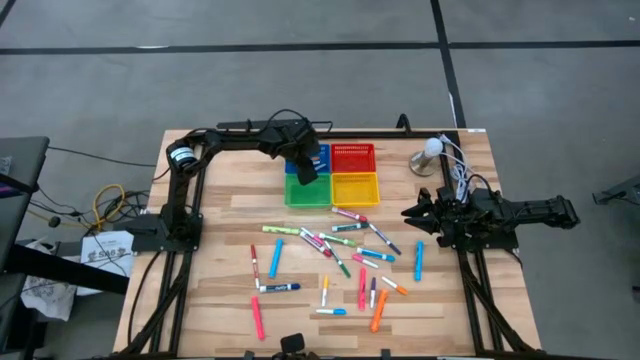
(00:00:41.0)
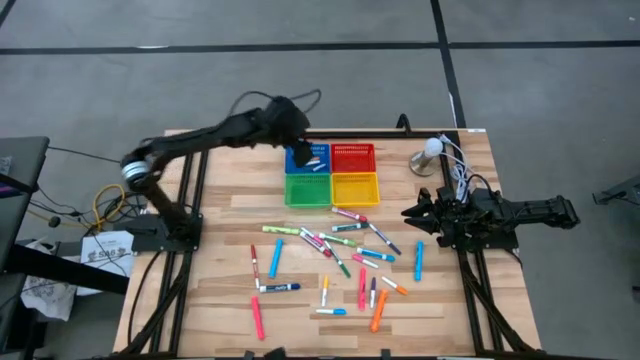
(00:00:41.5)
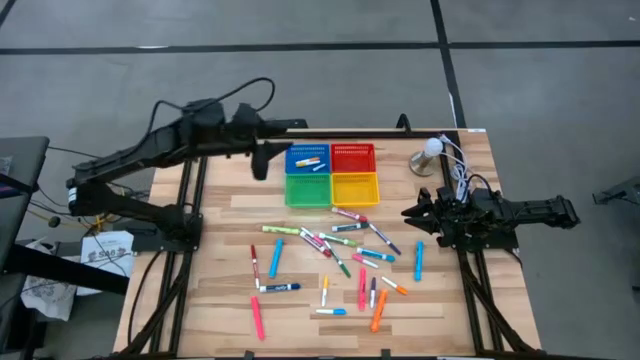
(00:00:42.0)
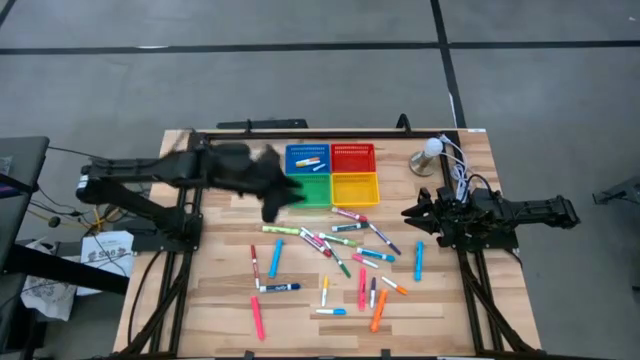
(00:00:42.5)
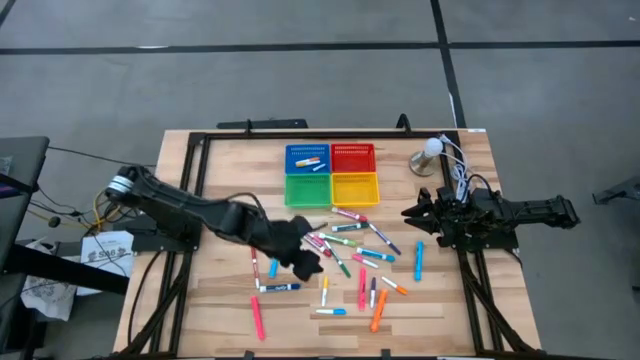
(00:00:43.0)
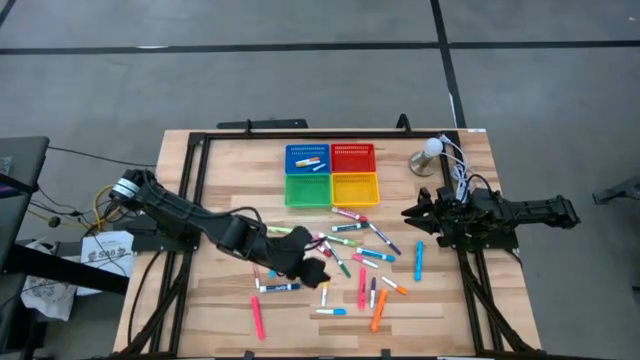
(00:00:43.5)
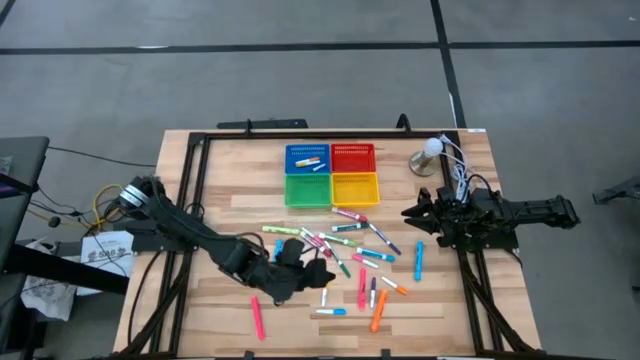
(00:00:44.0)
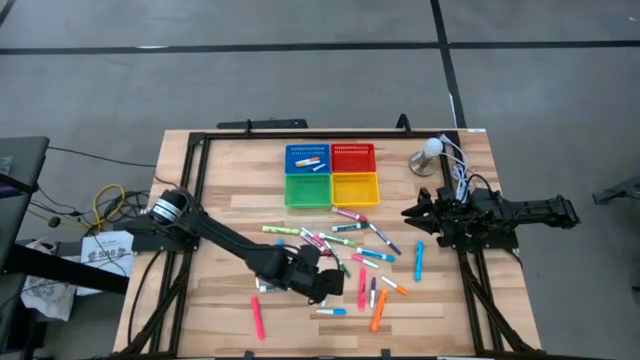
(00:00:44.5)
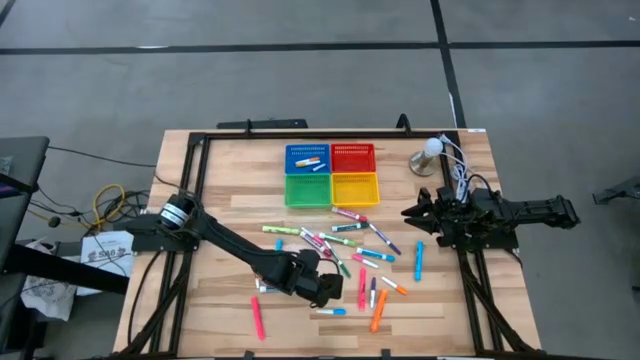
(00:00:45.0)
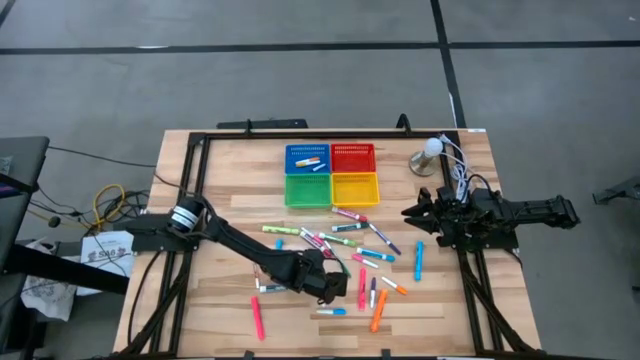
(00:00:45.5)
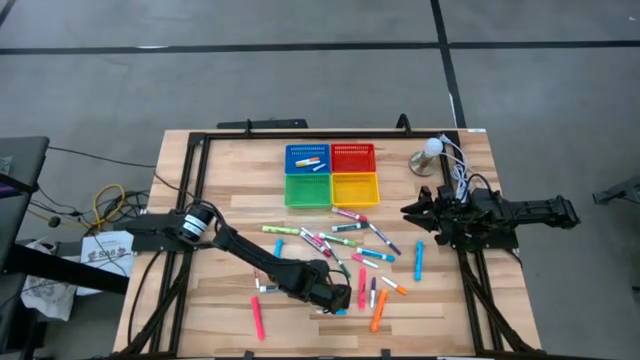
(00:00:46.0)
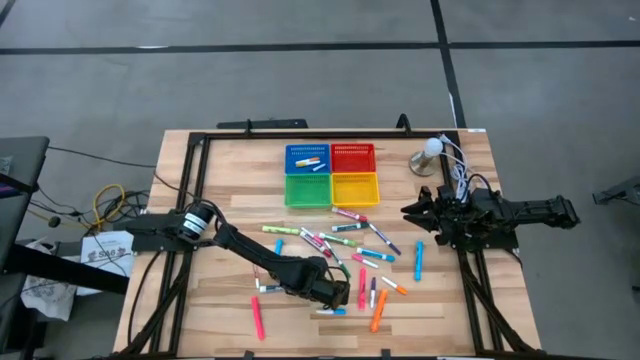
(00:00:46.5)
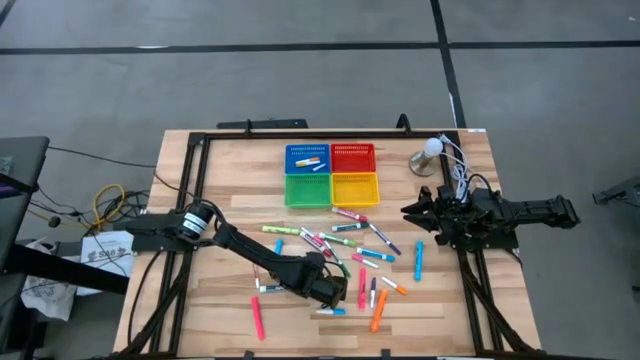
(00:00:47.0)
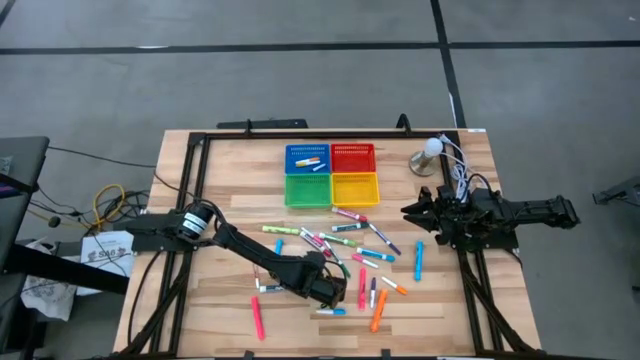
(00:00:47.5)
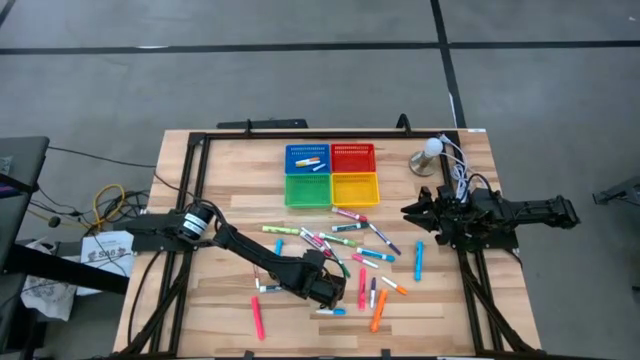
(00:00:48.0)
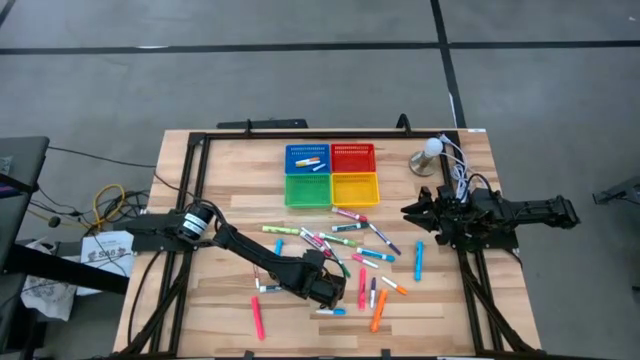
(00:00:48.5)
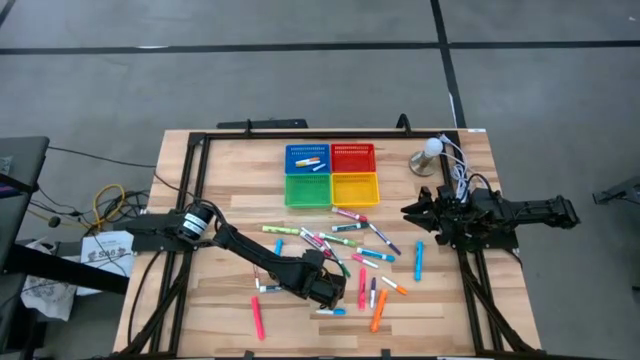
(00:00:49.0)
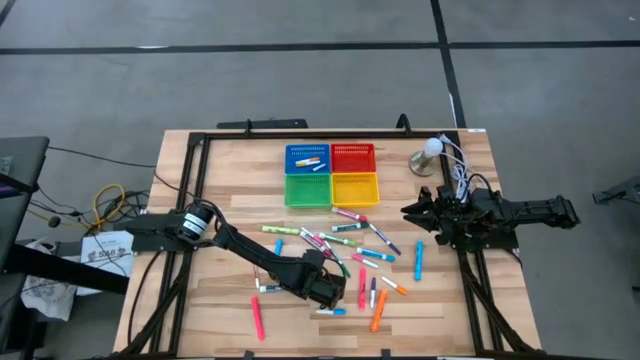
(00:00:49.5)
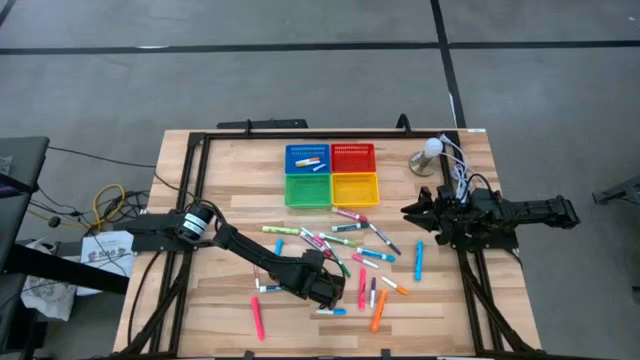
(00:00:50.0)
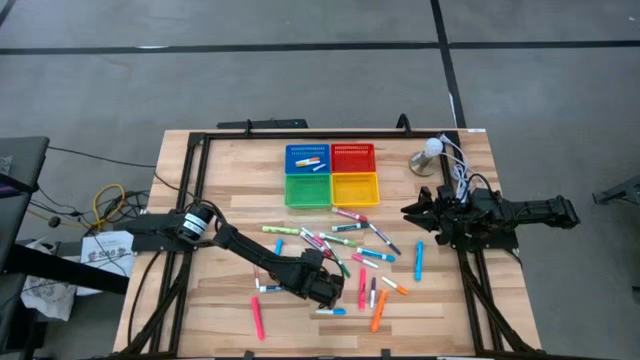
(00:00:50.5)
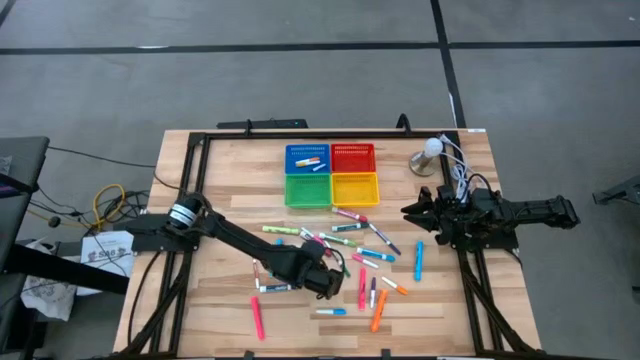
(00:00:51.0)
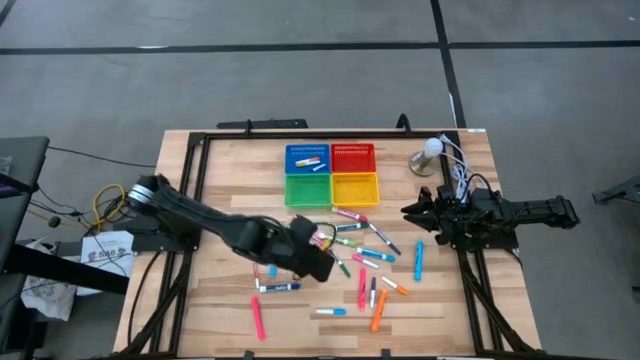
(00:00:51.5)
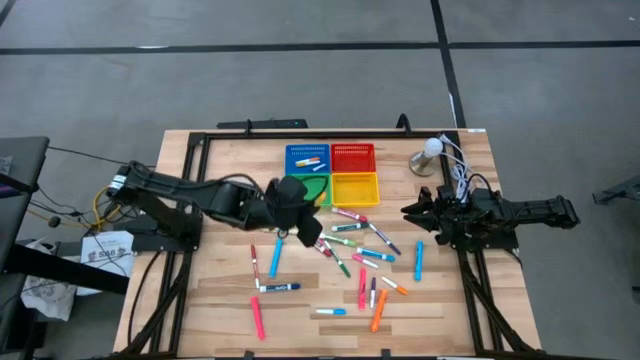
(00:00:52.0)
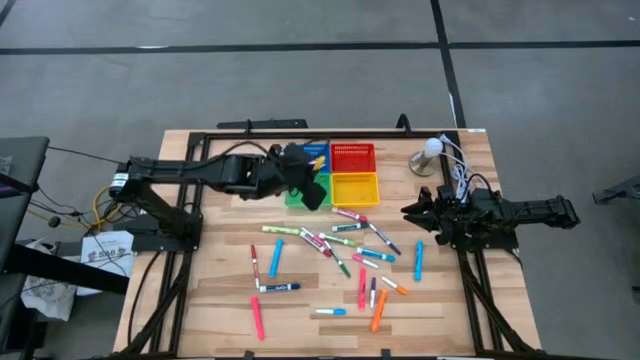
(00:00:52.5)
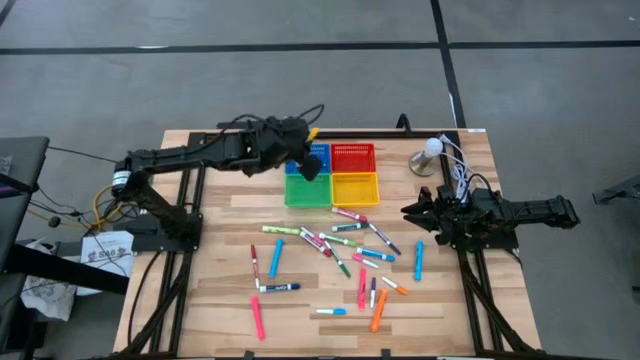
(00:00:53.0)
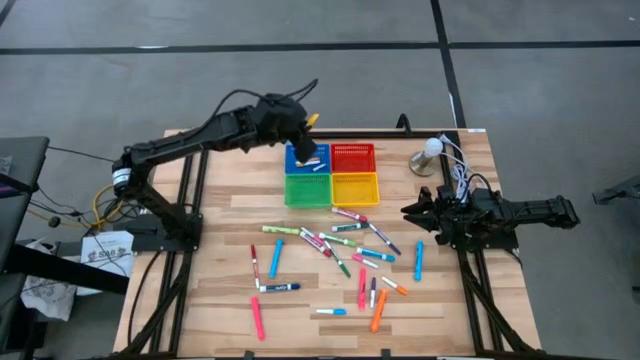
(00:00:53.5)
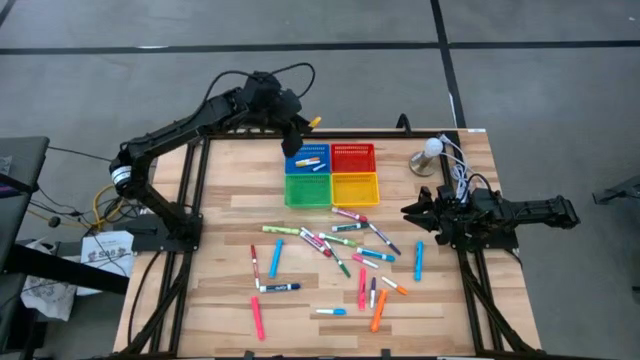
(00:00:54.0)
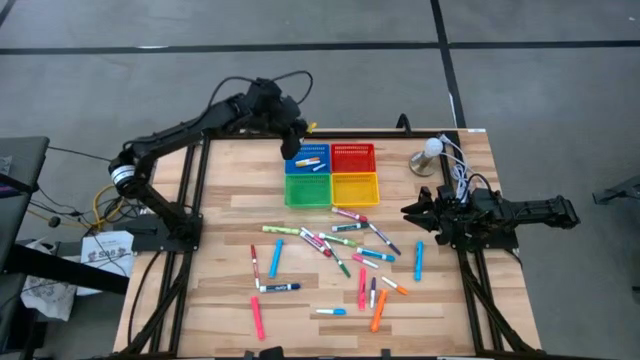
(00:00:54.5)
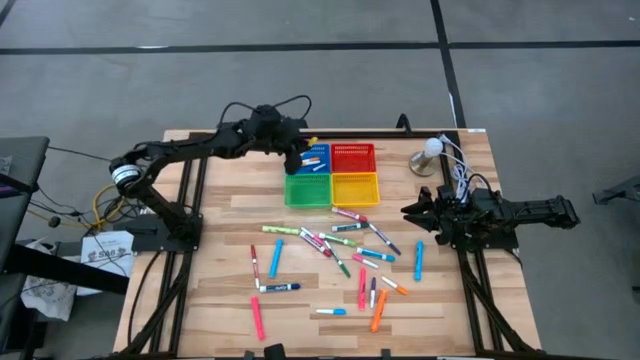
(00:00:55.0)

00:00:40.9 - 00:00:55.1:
Task: Pick & Place Markers
Put the yellow small marker into the blue bin

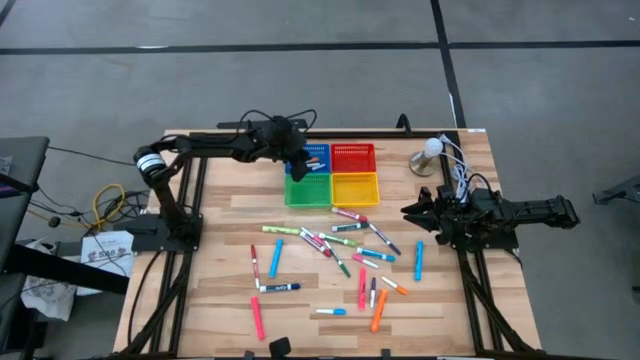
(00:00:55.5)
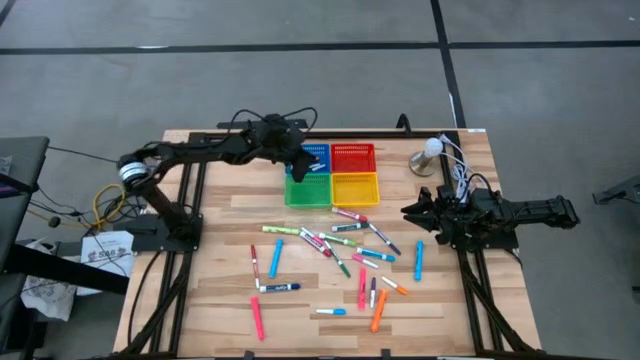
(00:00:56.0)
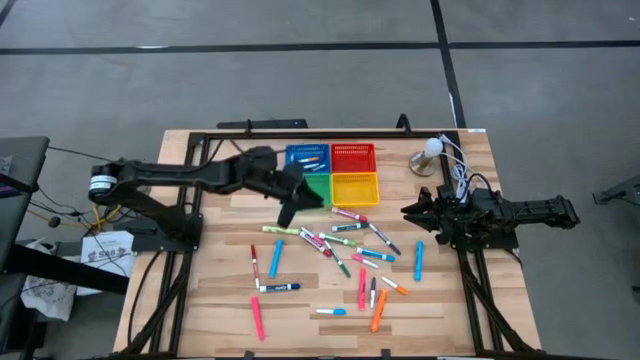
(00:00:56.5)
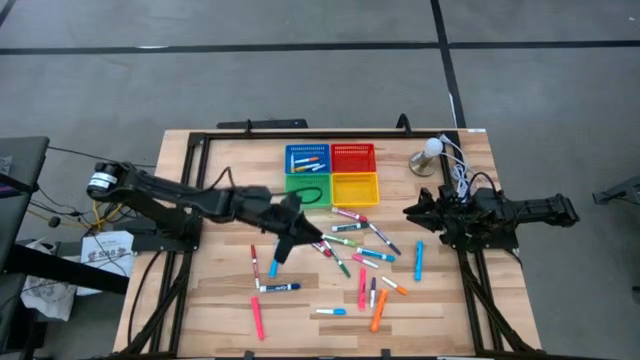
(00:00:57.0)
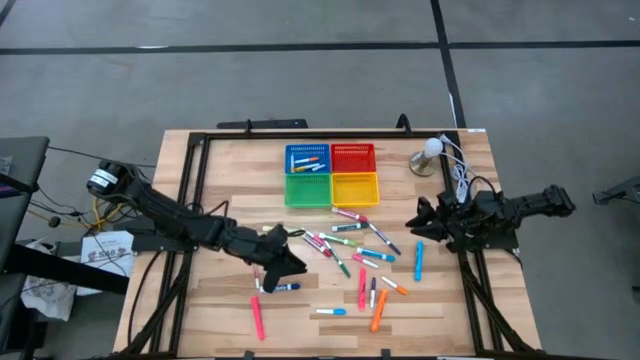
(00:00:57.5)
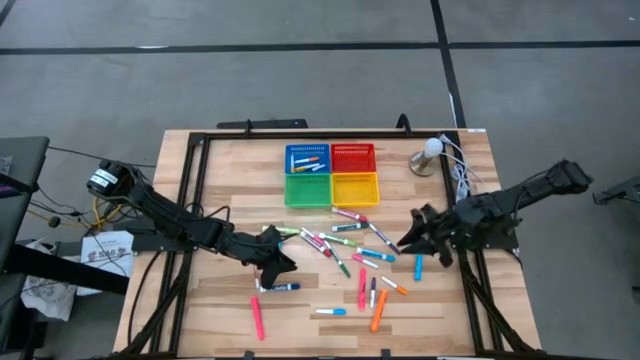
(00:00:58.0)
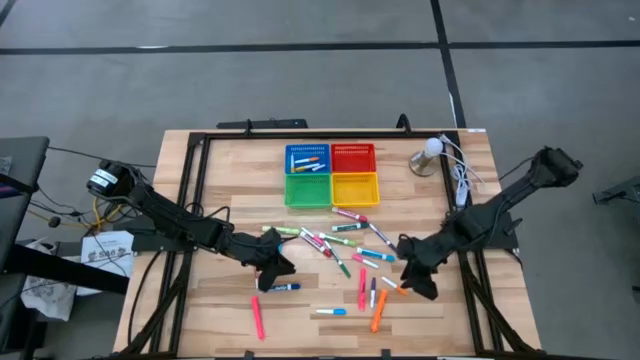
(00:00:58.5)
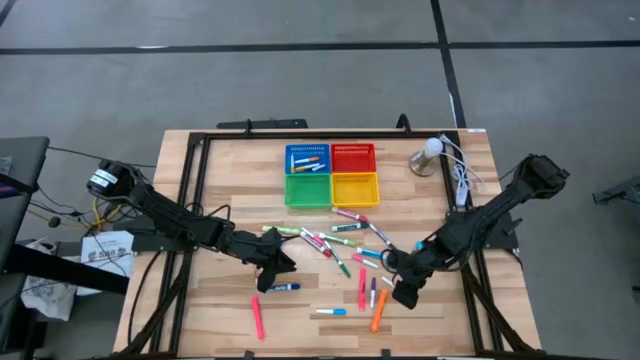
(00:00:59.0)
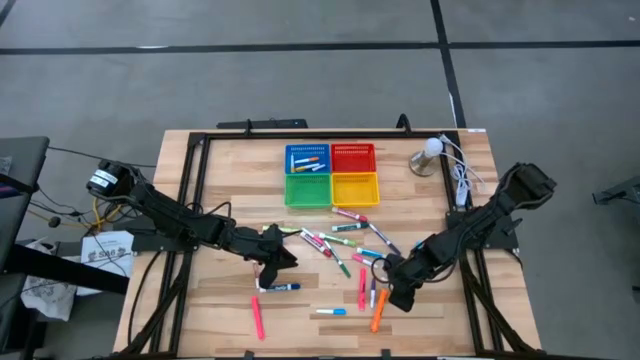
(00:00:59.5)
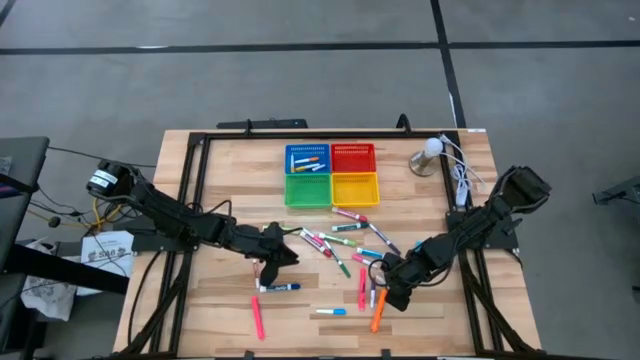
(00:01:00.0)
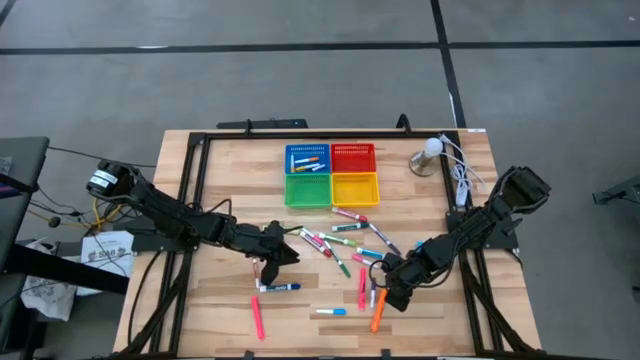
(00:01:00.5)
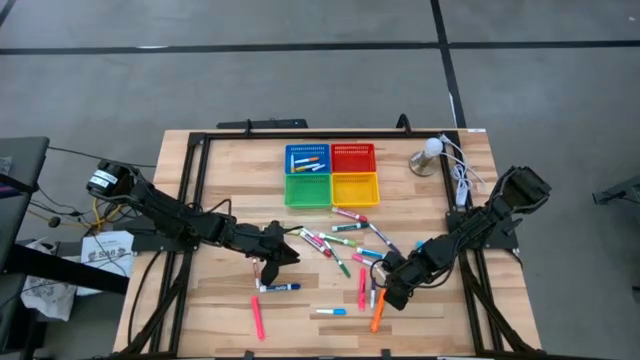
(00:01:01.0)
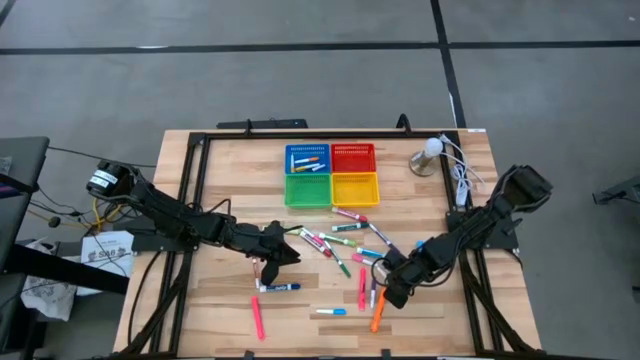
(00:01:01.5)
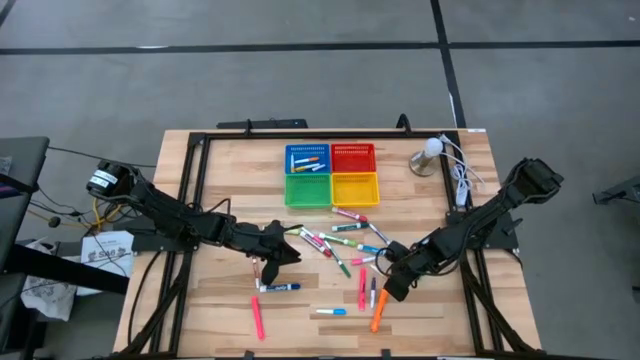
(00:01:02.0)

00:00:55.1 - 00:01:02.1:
Put the small orange marker into the blue bin
